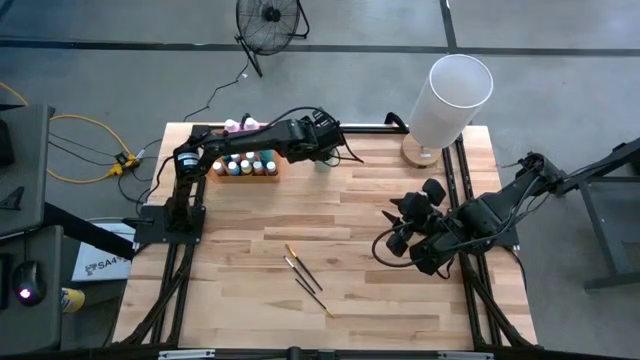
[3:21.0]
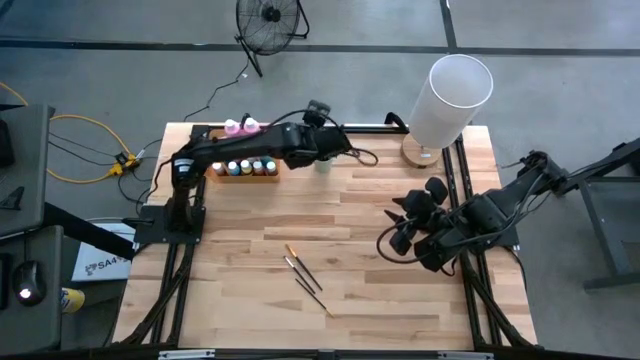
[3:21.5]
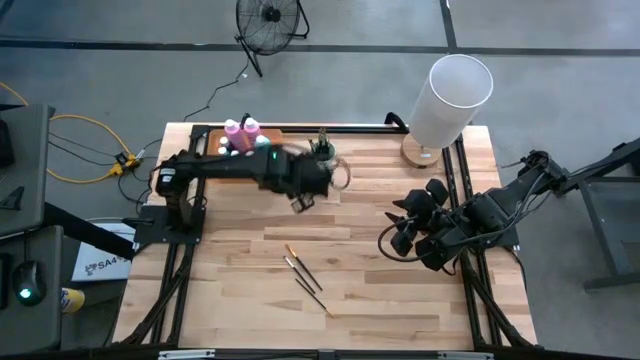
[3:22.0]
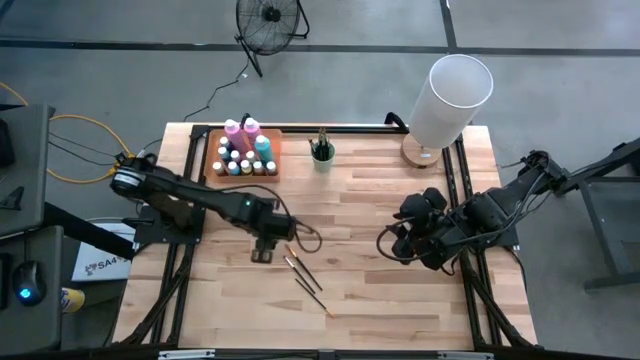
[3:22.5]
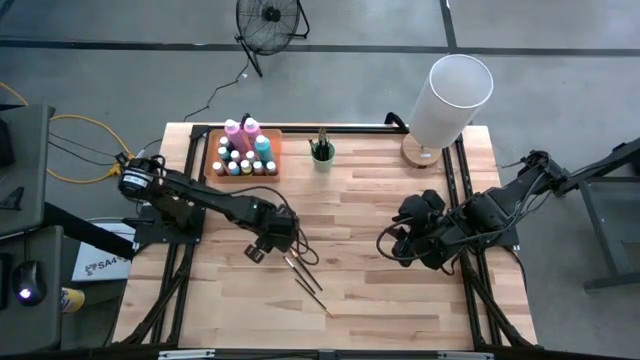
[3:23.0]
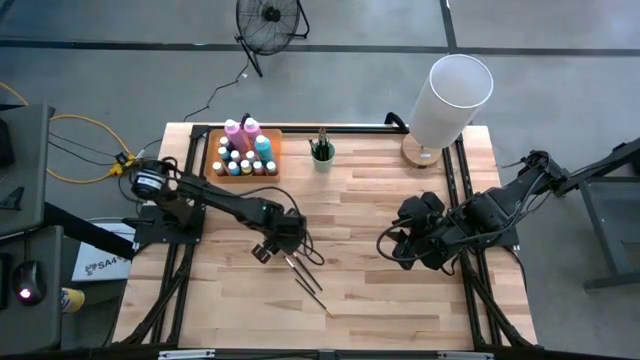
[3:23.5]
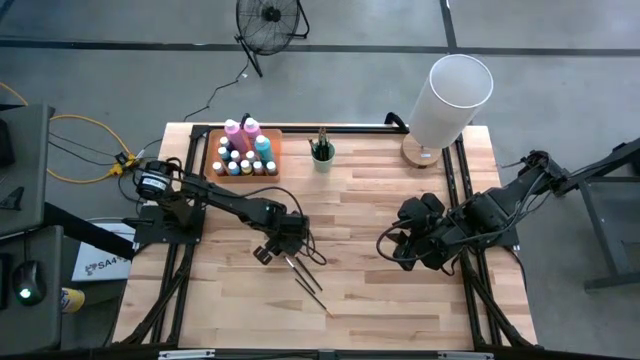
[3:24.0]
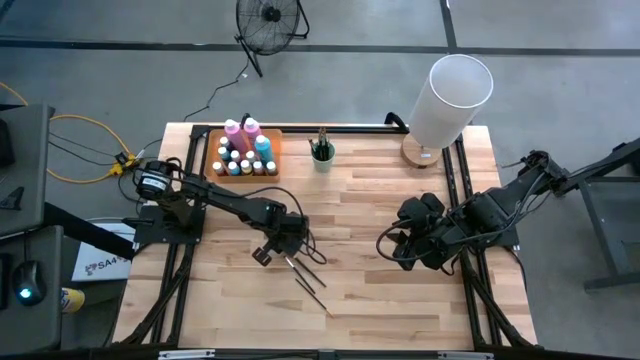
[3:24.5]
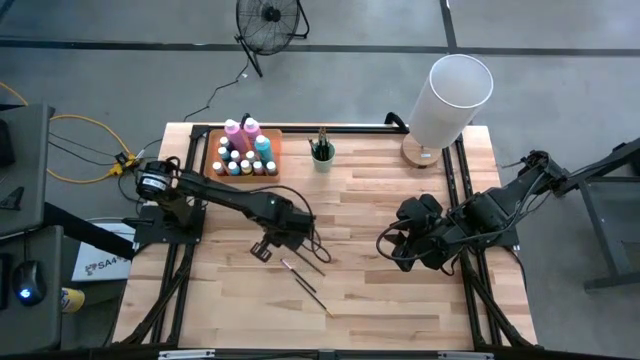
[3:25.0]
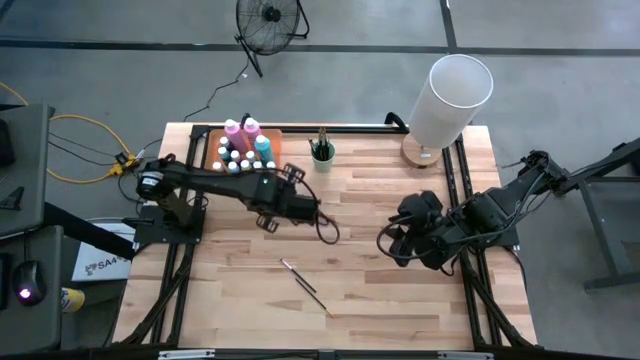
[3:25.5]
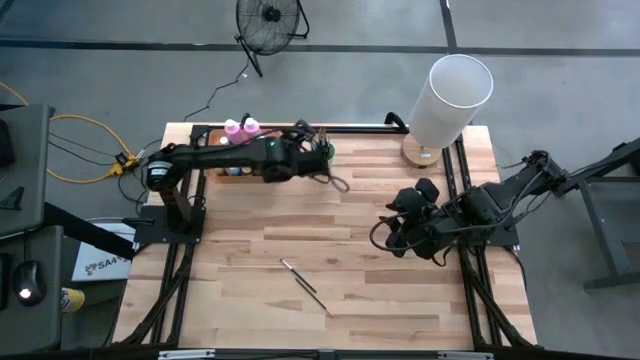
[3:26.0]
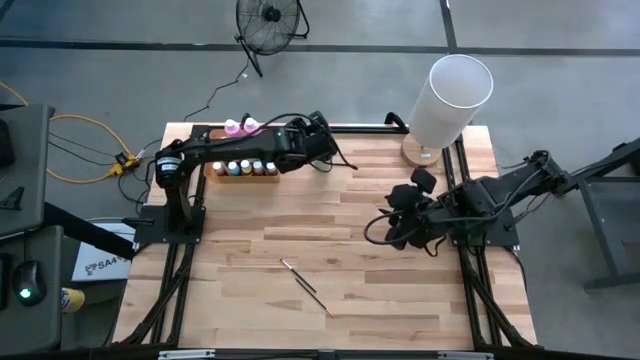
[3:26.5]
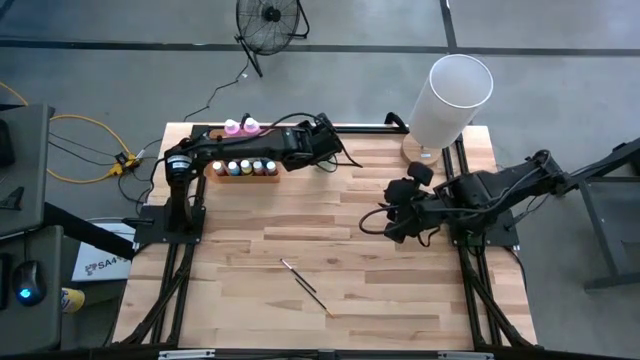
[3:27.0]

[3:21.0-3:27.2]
Task: Pick & Place Paint Supplies
Put the black paint brush into the green cup

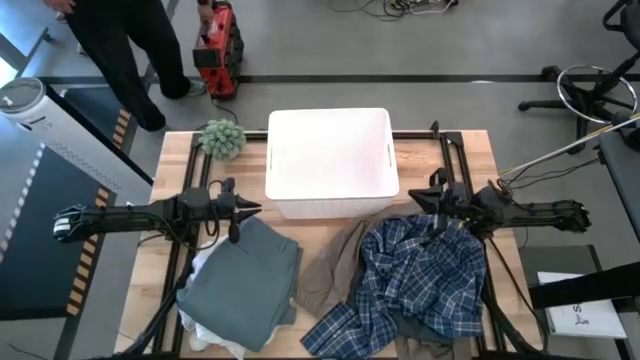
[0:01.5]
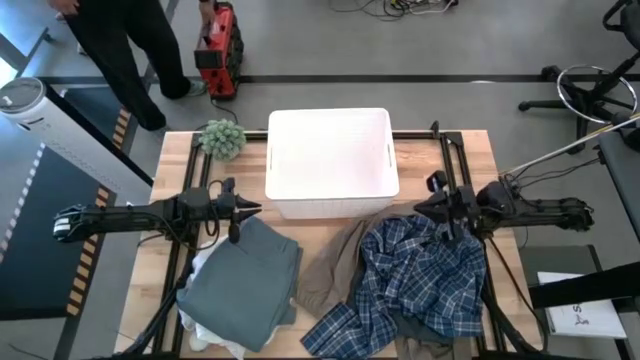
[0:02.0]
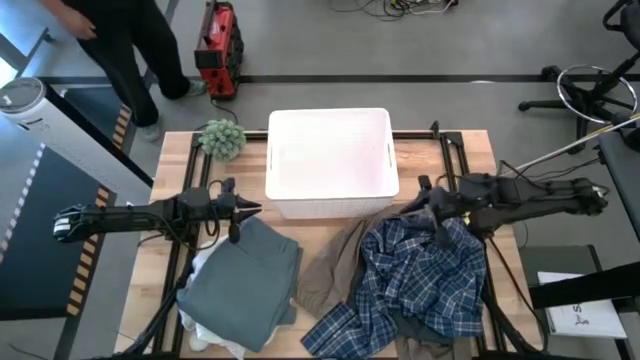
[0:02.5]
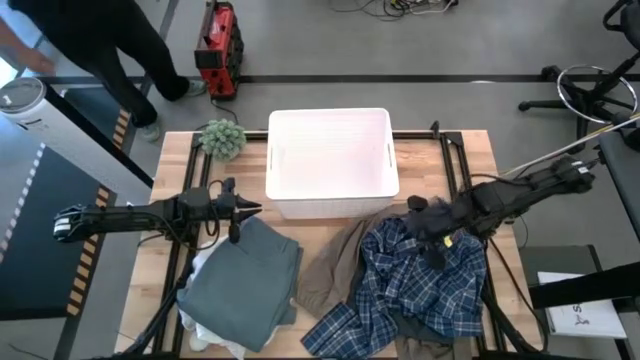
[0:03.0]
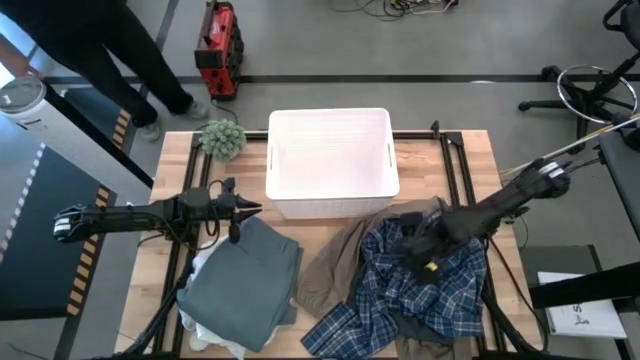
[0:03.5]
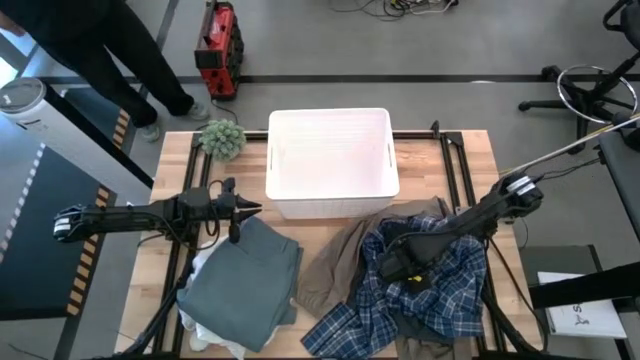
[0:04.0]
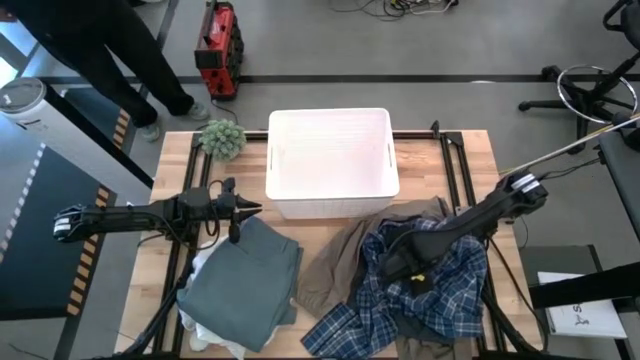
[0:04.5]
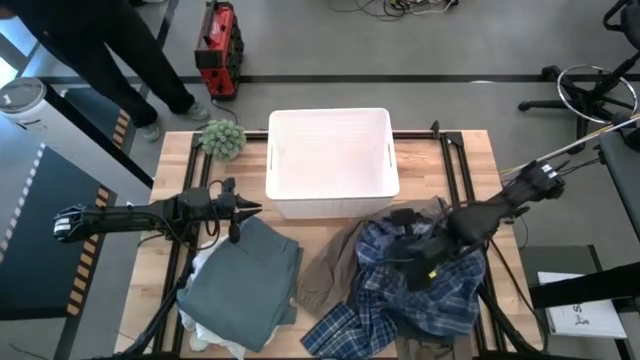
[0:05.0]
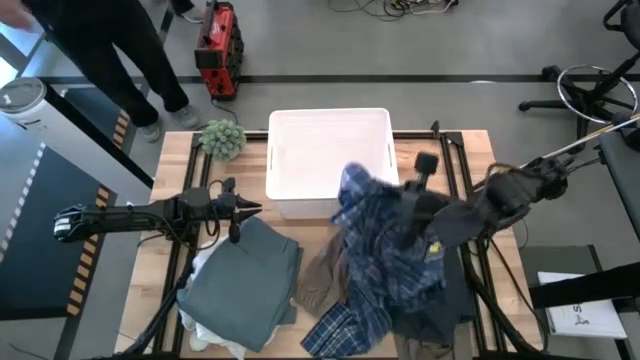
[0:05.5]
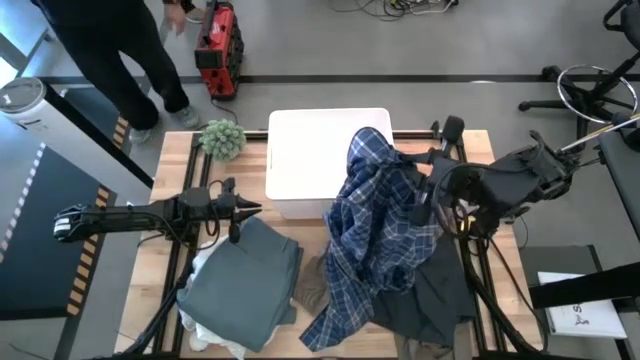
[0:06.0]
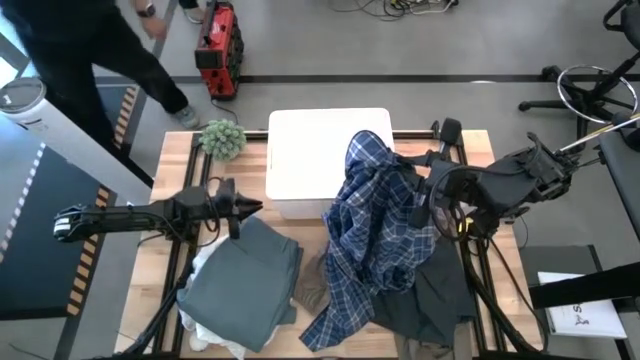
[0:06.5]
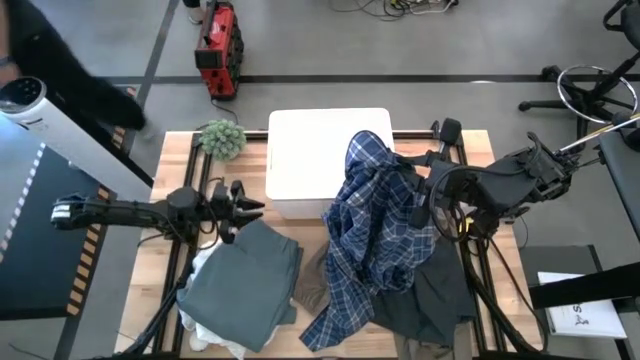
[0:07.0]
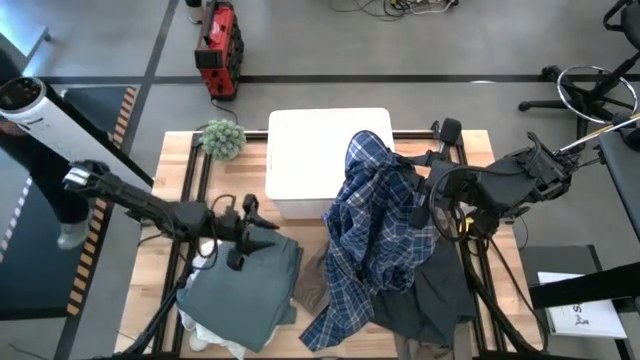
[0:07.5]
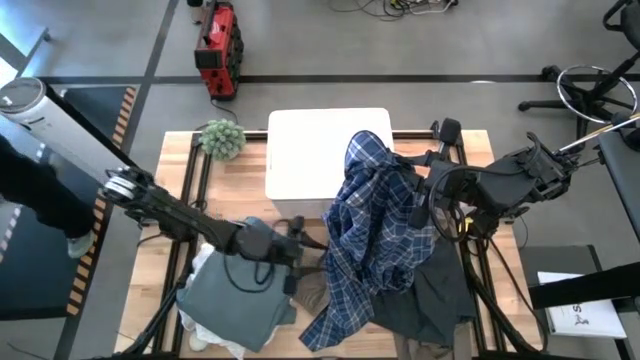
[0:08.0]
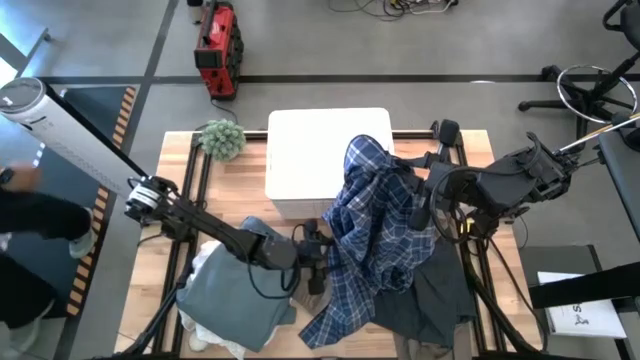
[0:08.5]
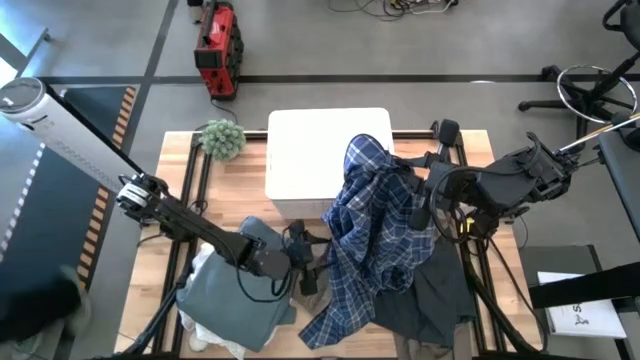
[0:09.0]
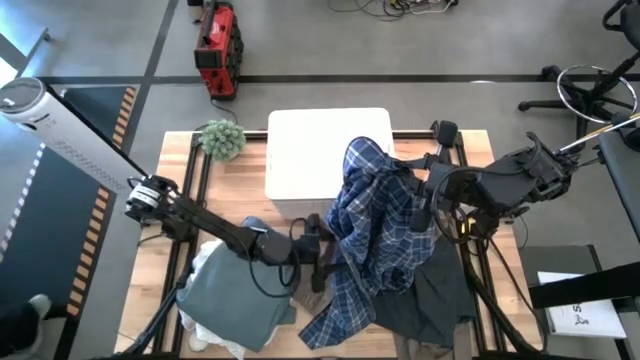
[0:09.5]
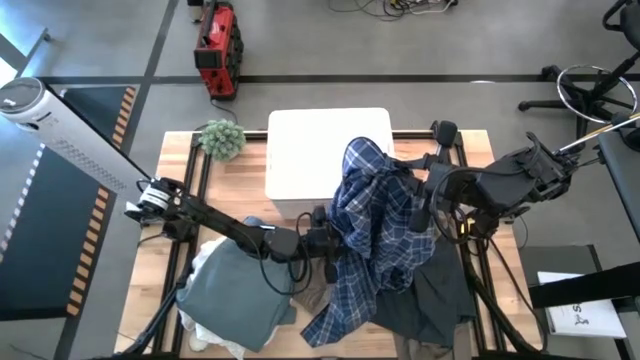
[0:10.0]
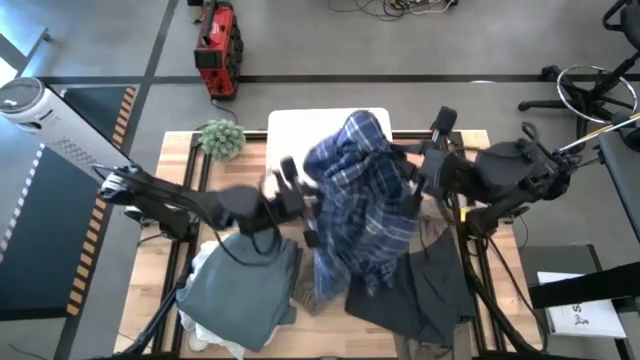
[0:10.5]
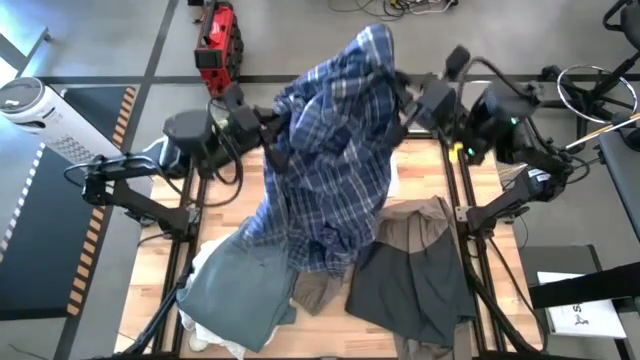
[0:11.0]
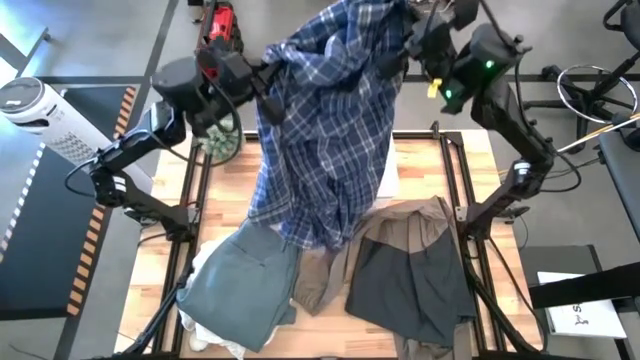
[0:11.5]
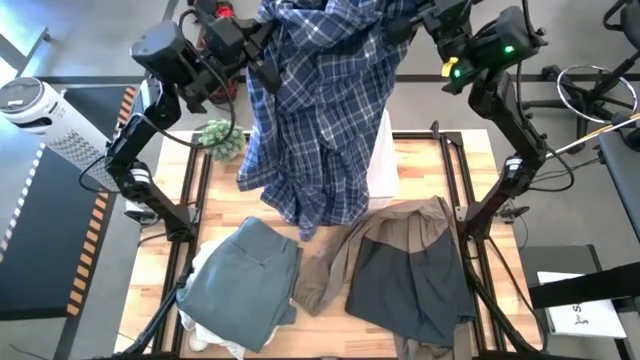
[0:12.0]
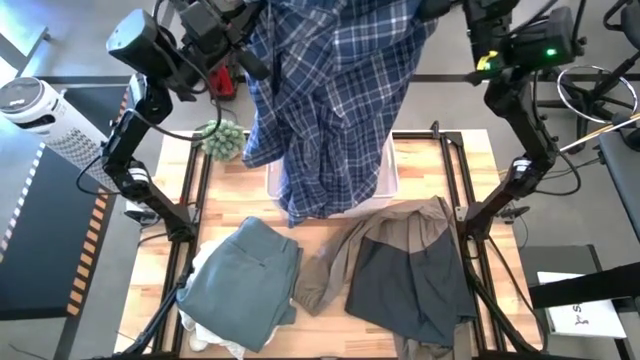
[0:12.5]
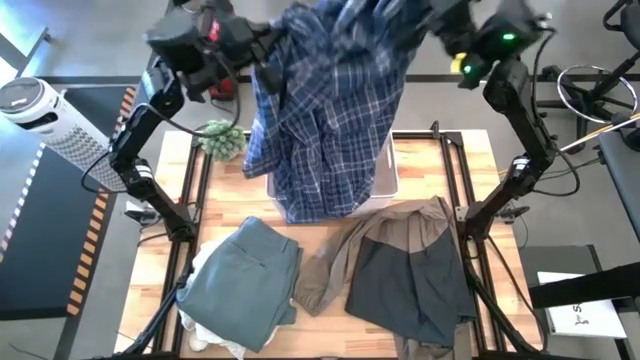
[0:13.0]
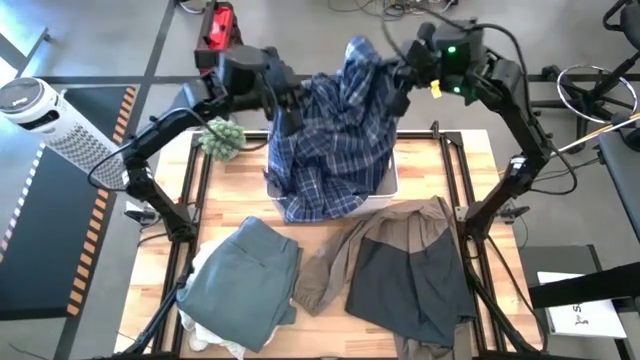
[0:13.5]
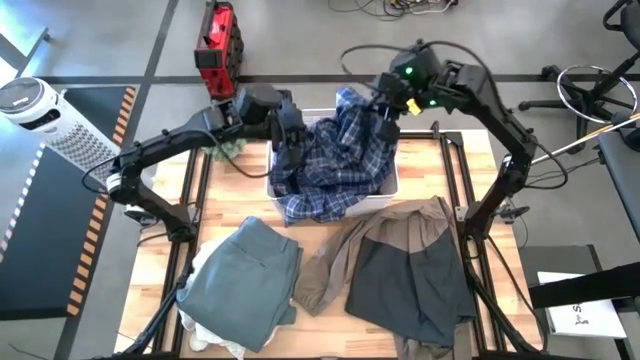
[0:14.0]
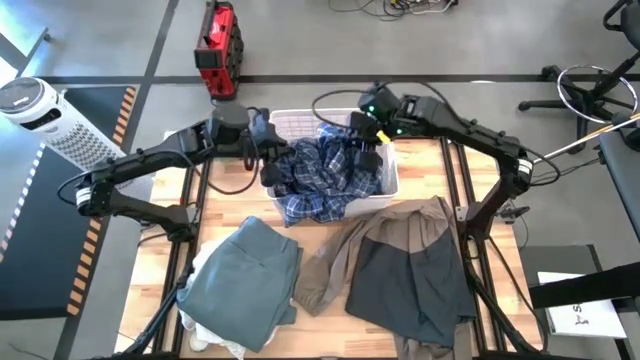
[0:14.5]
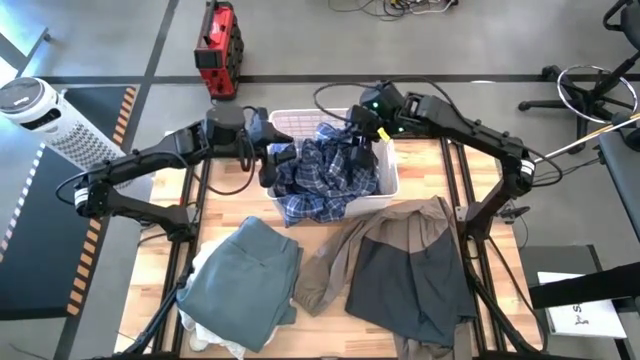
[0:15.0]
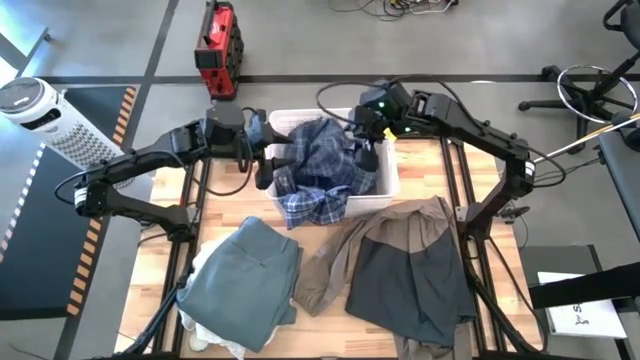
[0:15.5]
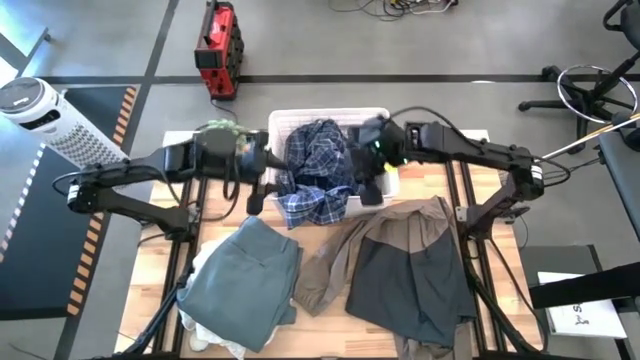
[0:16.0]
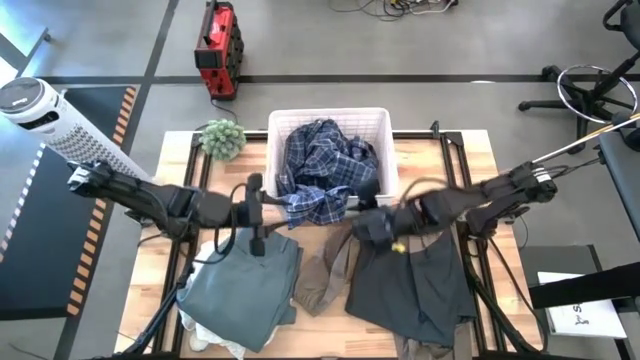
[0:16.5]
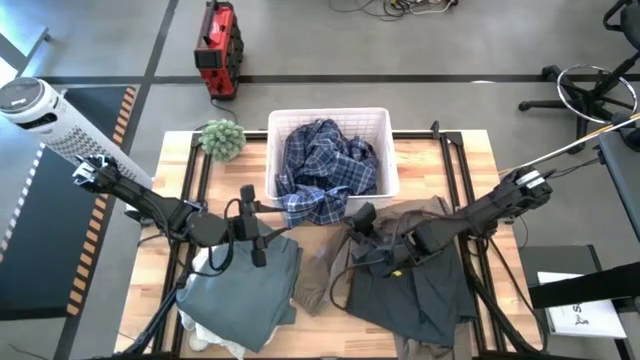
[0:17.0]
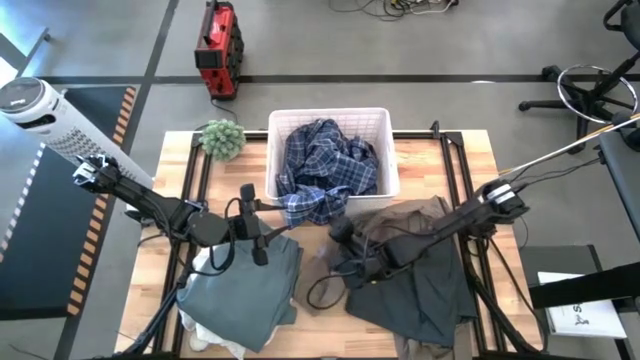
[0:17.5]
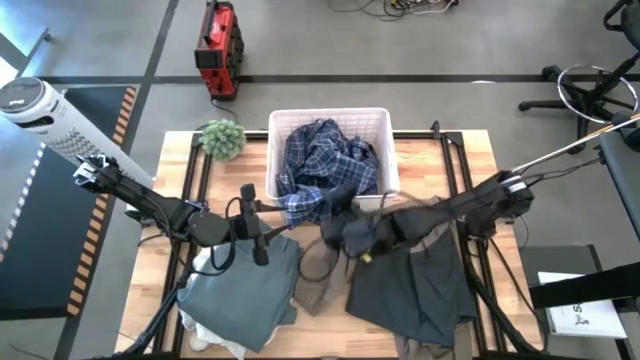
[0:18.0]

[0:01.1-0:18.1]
Task: Sort clothes
Put the blue shirt into the white bin
